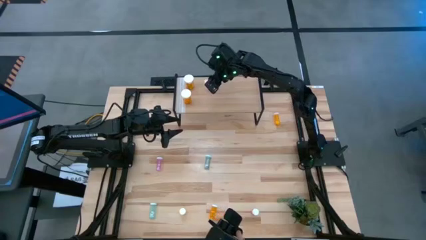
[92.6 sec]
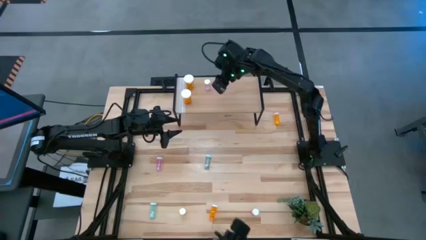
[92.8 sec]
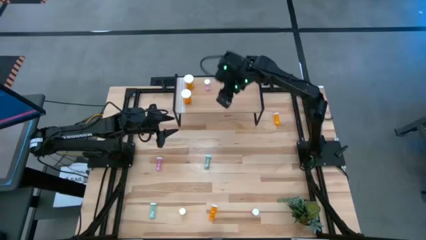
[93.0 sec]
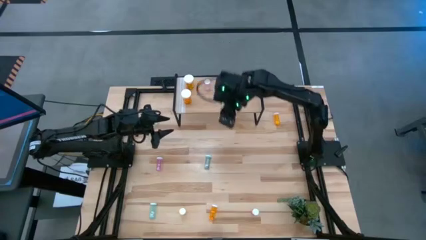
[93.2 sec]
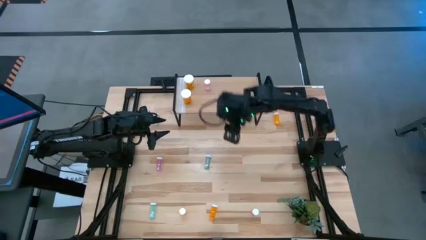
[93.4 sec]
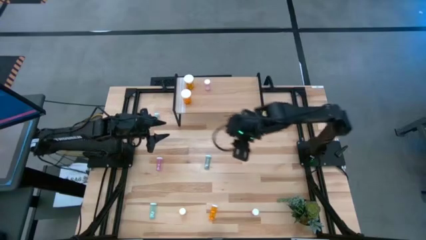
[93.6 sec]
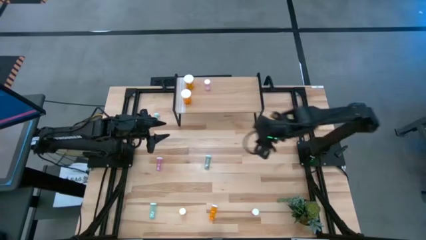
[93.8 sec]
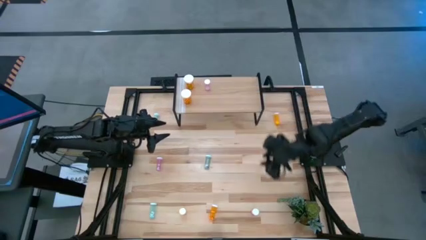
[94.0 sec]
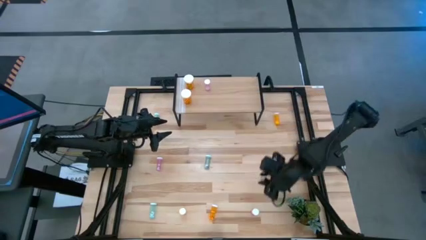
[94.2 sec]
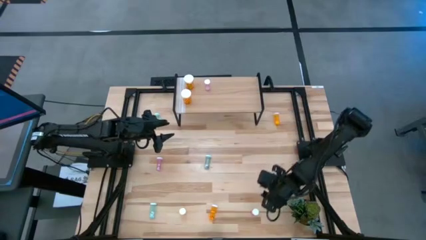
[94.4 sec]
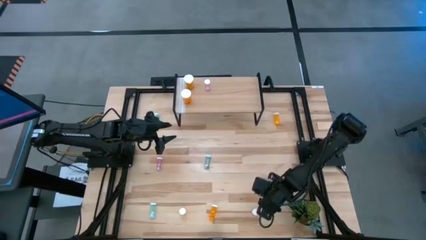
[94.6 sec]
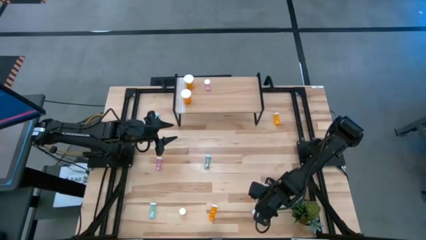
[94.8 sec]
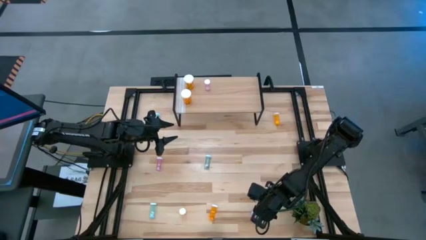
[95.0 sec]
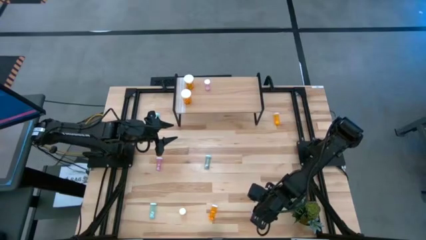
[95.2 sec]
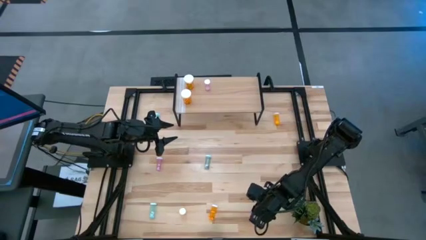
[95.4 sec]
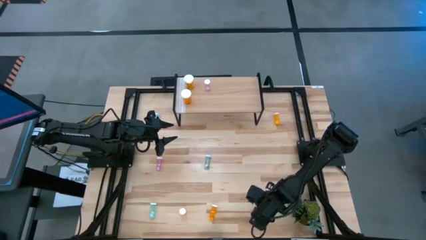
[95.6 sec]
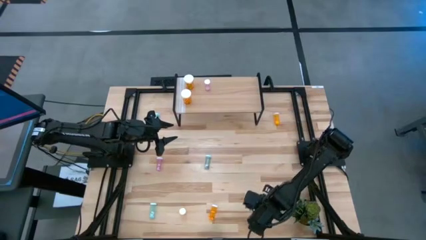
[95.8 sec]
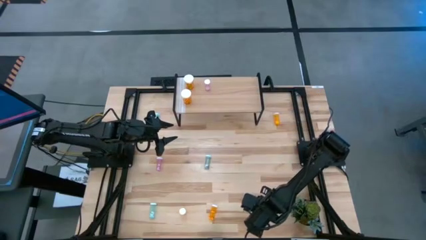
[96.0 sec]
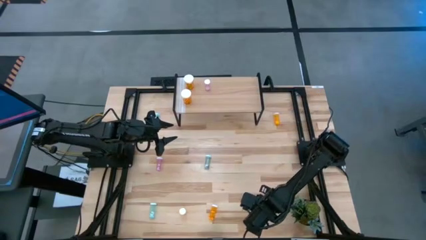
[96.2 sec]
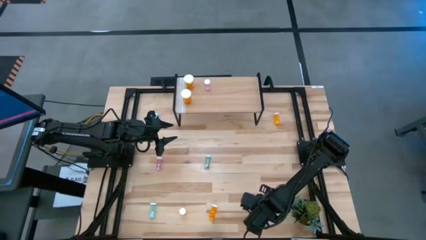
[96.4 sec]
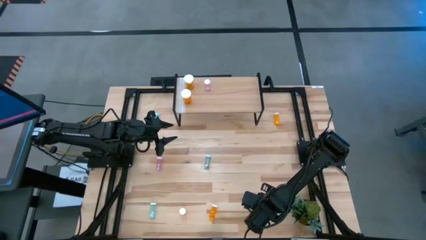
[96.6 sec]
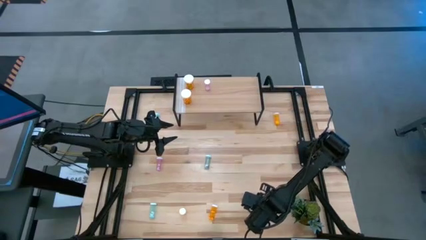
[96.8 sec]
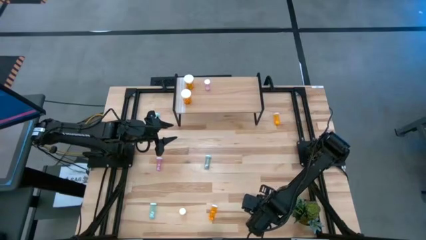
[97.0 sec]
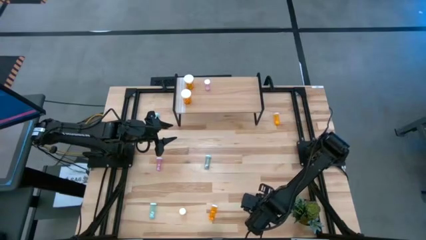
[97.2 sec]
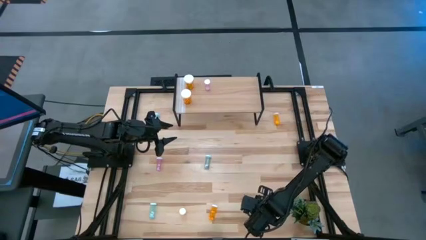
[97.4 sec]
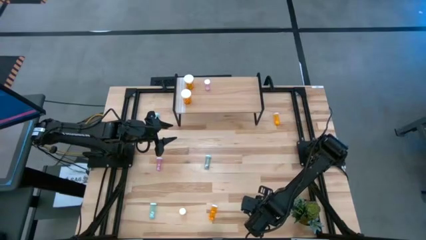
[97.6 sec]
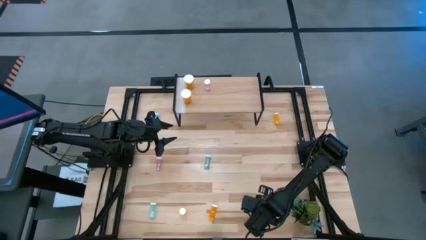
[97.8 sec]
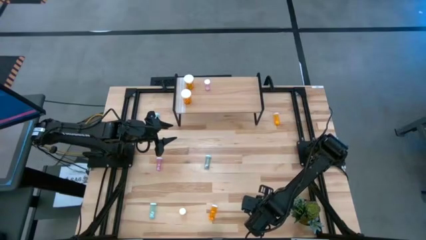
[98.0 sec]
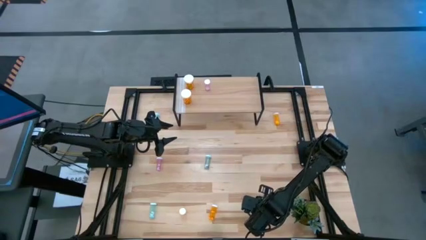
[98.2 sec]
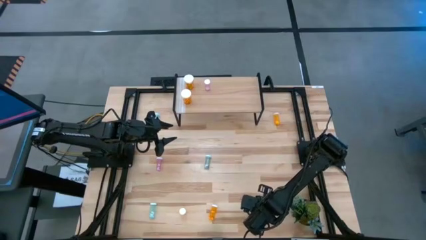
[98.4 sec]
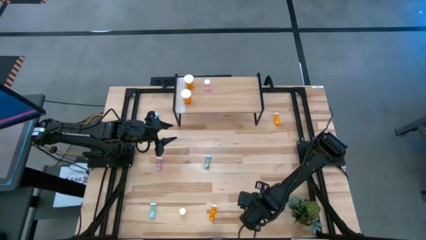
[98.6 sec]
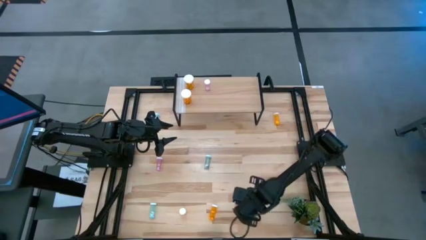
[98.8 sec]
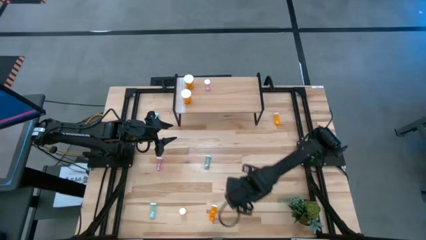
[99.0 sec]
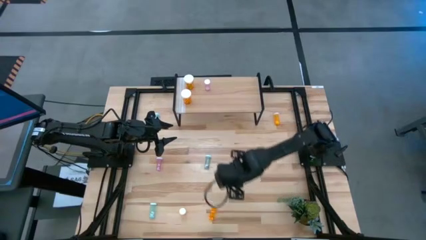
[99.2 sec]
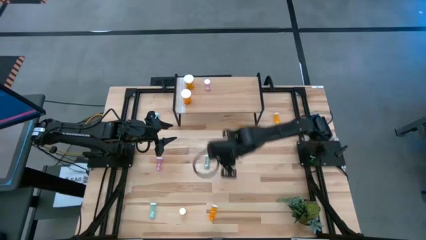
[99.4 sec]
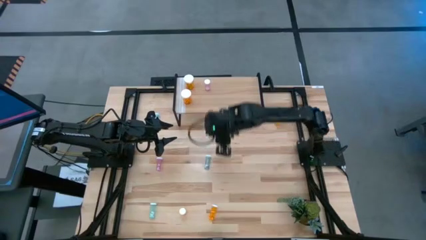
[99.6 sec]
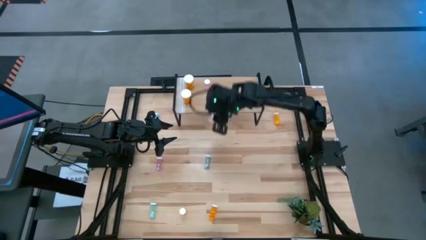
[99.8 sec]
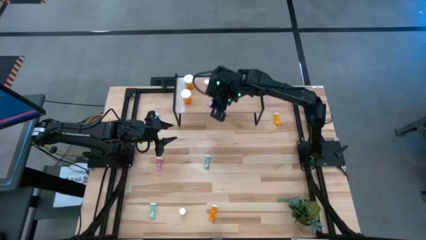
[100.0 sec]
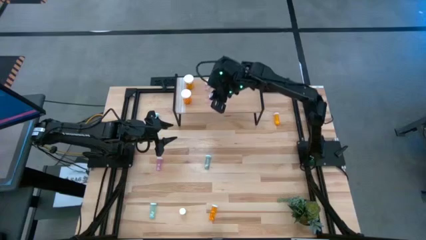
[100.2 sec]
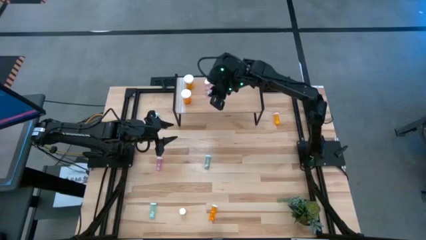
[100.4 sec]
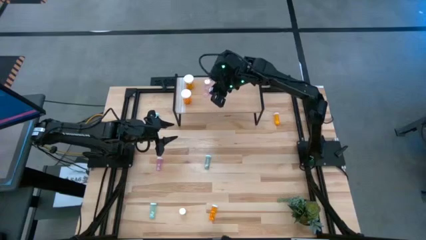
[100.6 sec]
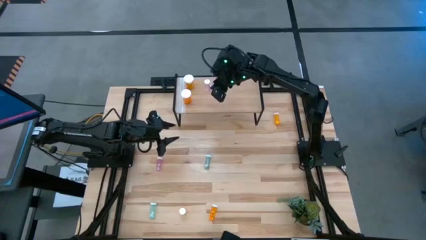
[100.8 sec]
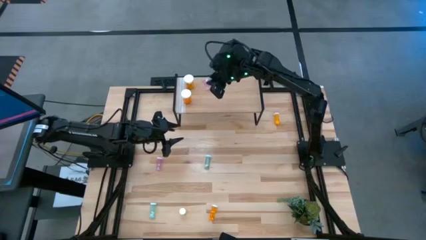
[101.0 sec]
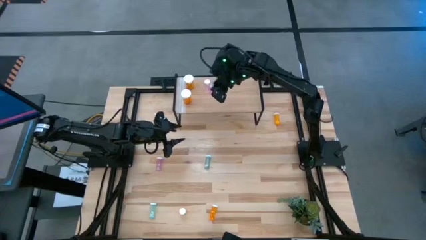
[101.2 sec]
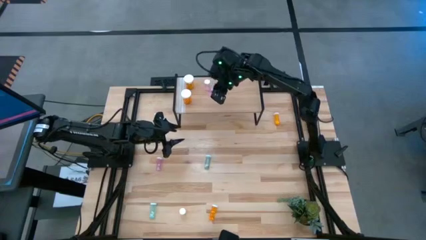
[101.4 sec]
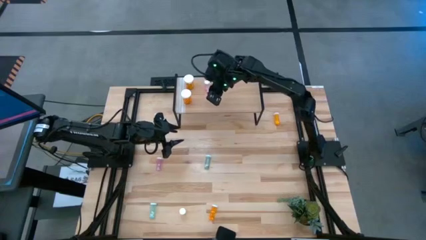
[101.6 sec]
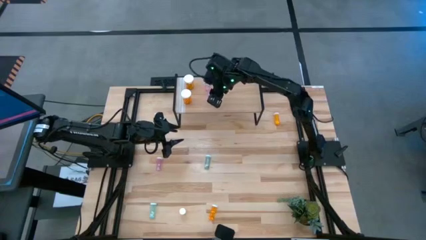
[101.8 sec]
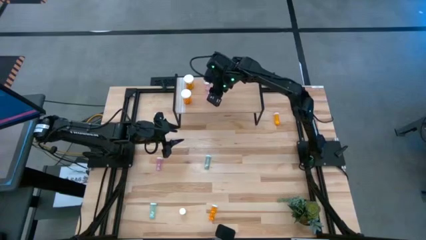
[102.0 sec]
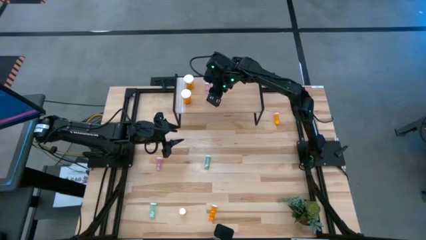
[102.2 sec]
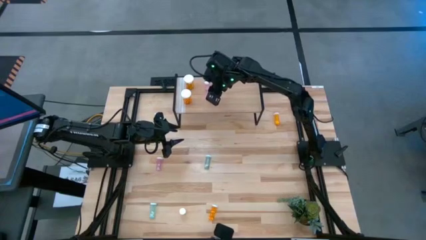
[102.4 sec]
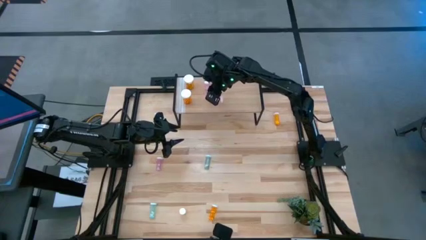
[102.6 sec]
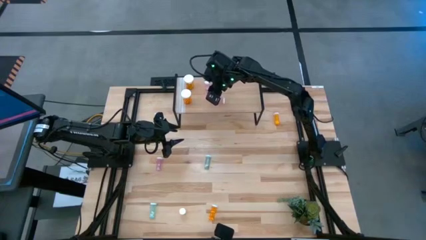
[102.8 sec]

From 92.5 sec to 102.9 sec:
Task: Pick and place medicine bottles onto shelf by color
Put the bottom small pink pill bottle aligned with the other small pink bottle on the shelf

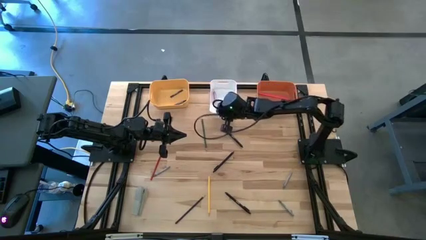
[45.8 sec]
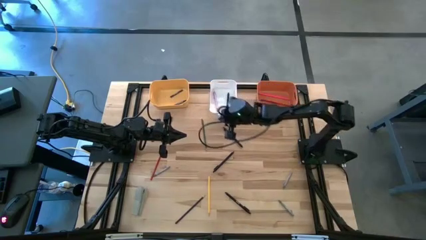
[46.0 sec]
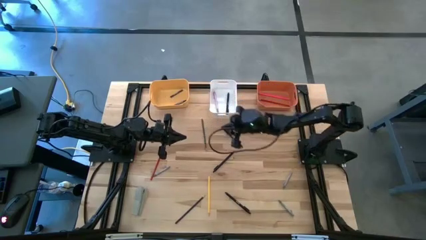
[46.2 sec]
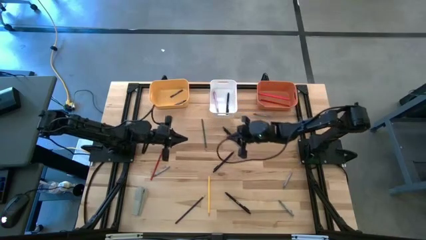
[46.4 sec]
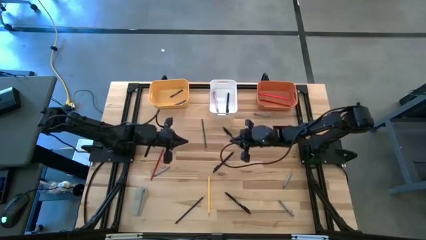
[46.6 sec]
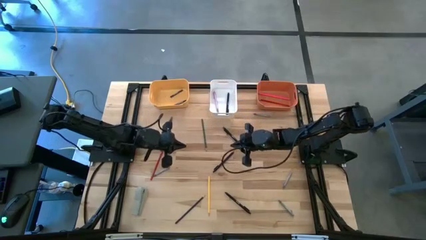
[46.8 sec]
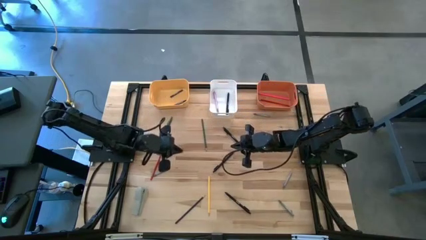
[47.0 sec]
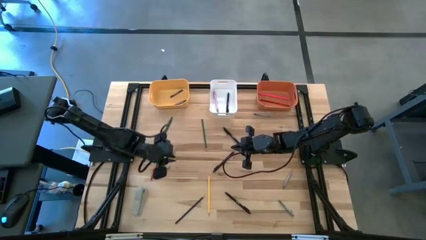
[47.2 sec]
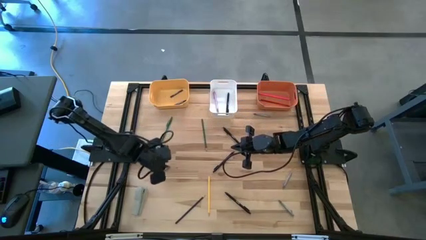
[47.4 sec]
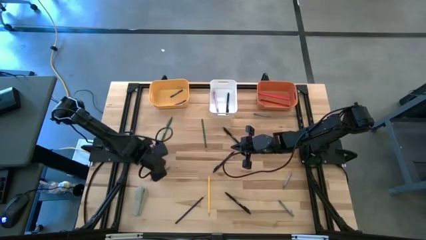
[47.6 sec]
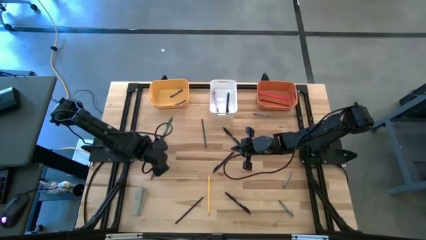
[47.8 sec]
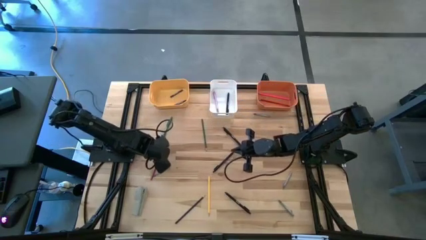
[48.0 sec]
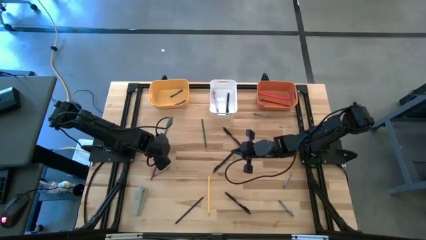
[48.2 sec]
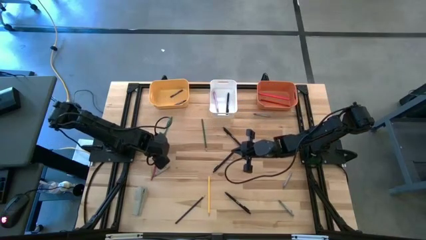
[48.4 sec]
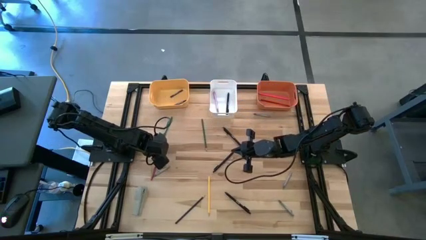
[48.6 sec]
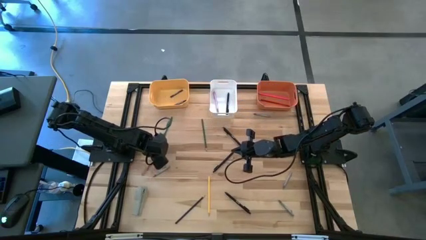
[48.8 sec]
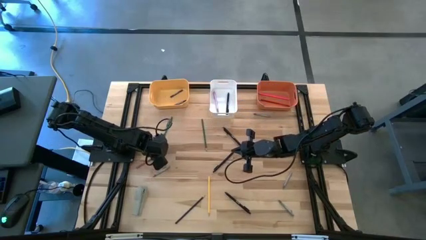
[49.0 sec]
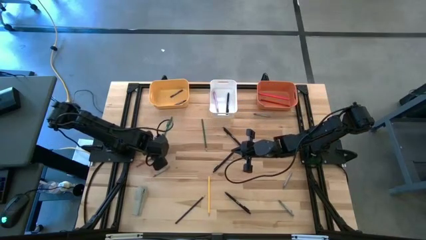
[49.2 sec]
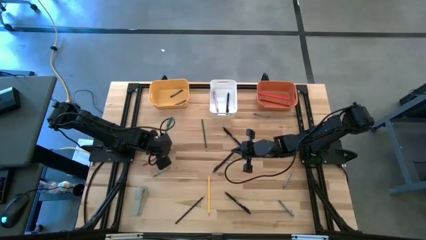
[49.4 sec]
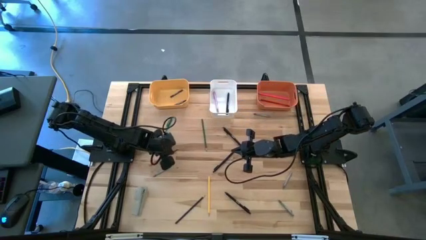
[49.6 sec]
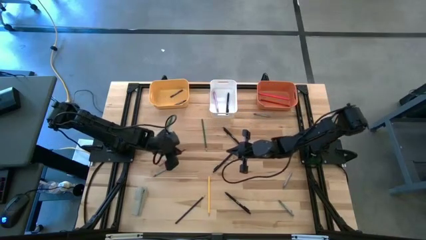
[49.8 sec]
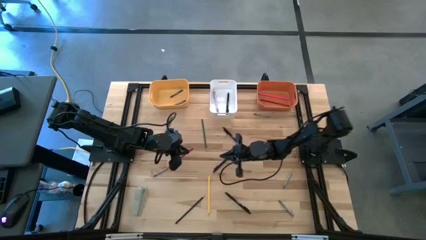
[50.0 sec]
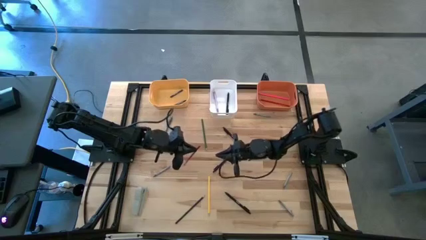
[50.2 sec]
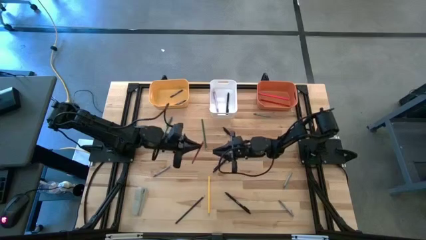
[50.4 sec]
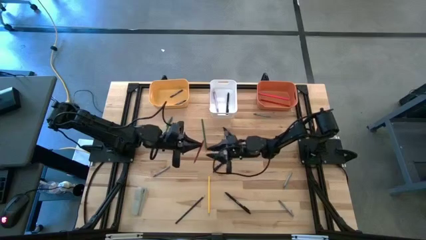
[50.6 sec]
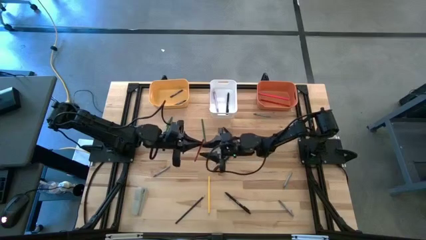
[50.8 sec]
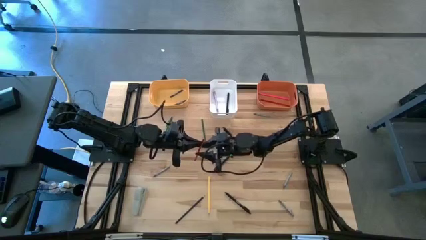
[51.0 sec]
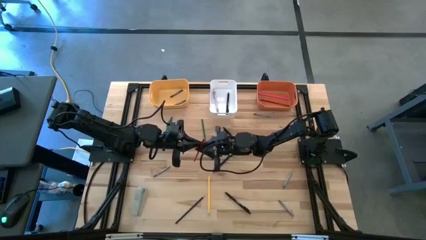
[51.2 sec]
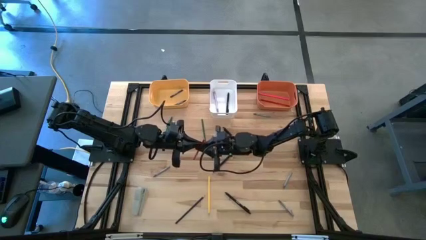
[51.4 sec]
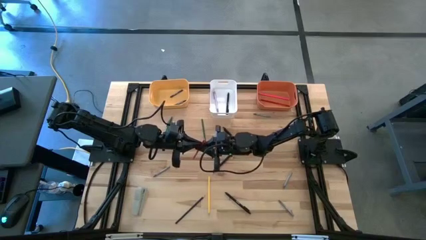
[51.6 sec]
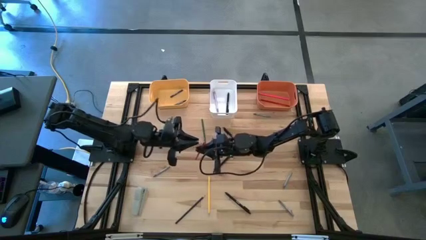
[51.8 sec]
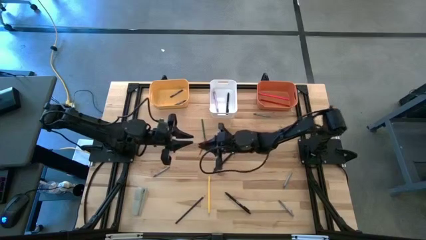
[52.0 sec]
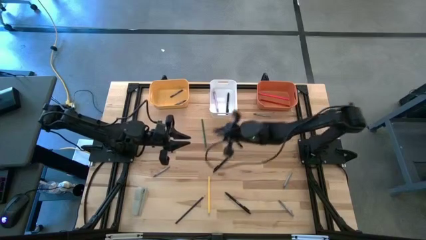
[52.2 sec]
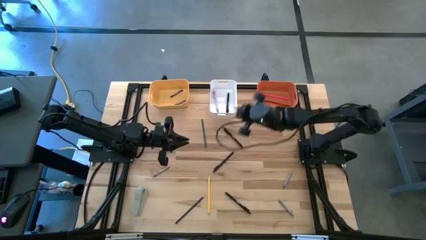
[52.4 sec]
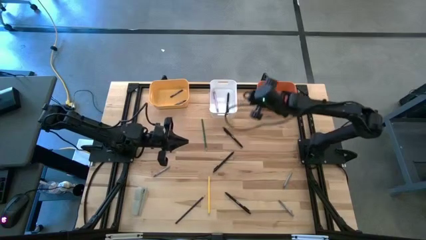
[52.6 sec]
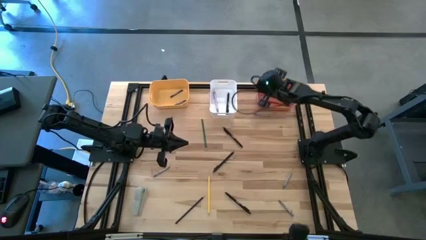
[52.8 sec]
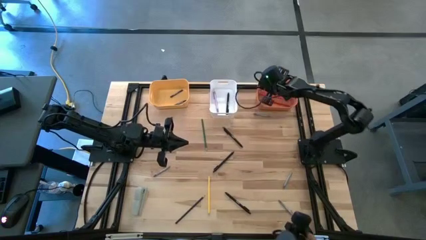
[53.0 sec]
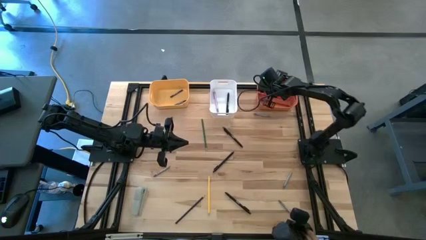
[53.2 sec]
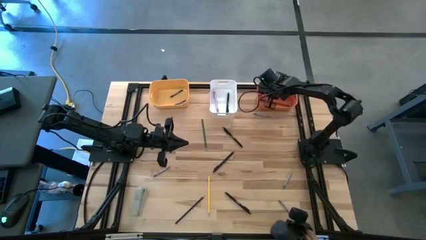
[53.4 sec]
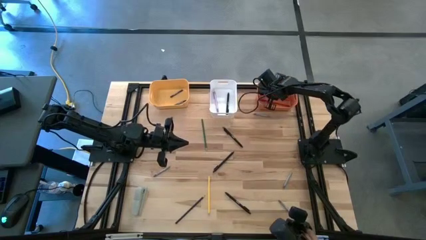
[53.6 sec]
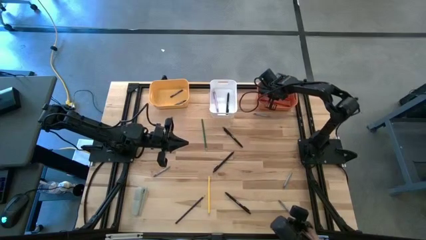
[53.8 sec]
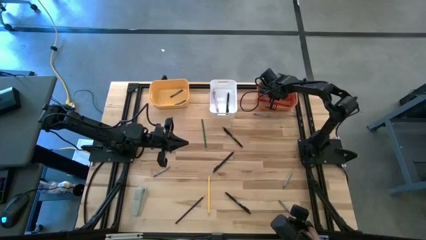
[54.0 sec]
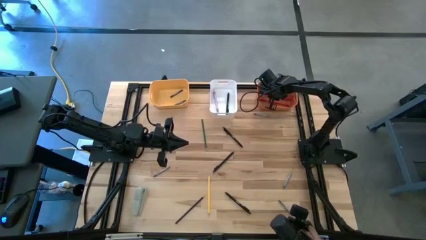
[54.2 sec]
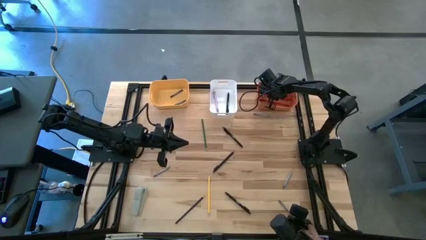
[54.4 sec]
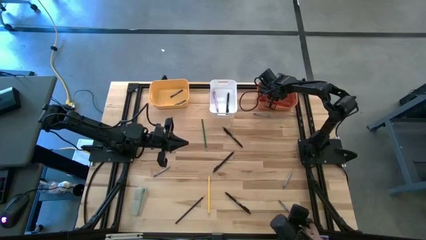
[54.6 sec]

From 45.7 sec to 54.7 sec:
Task: Sort crayons/erasers/pens/pencils in bins
Put the red pencil into the orange bin
